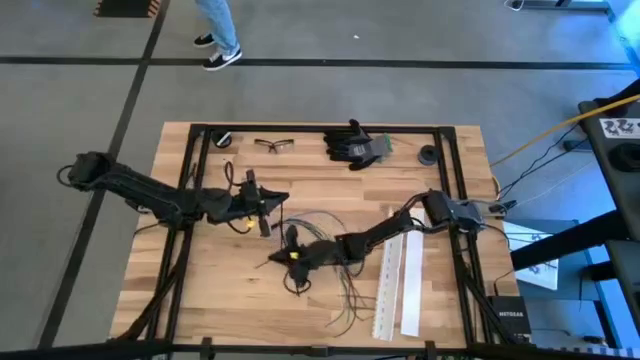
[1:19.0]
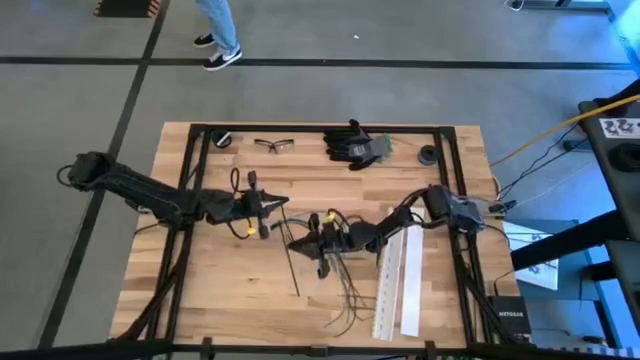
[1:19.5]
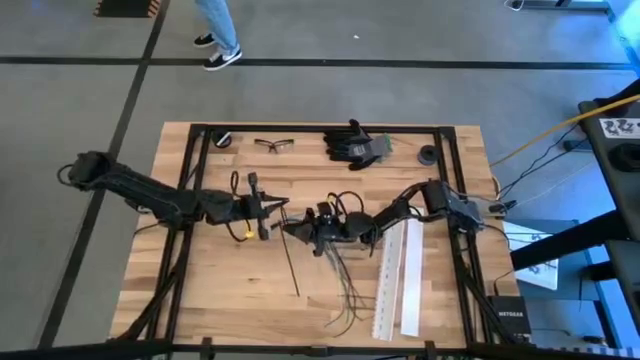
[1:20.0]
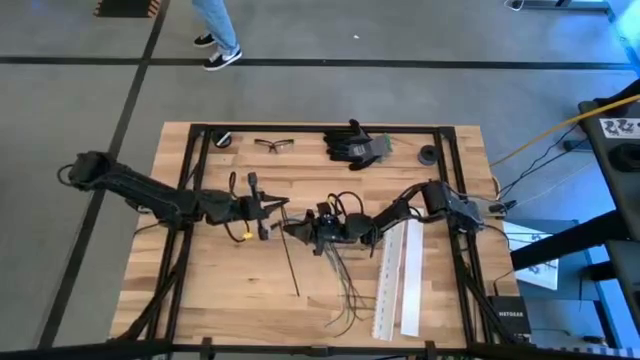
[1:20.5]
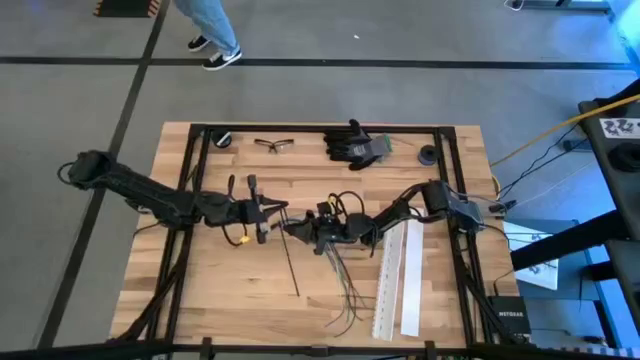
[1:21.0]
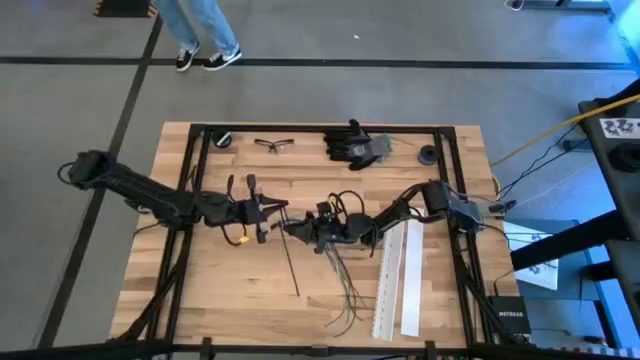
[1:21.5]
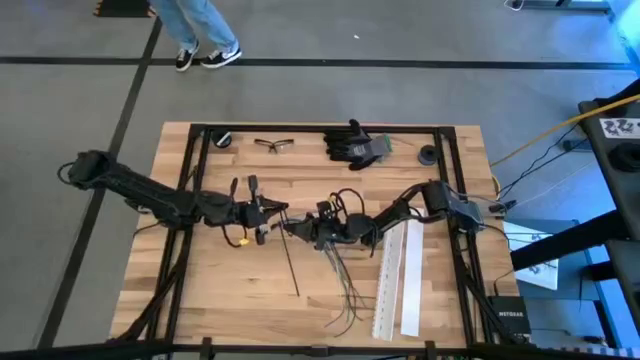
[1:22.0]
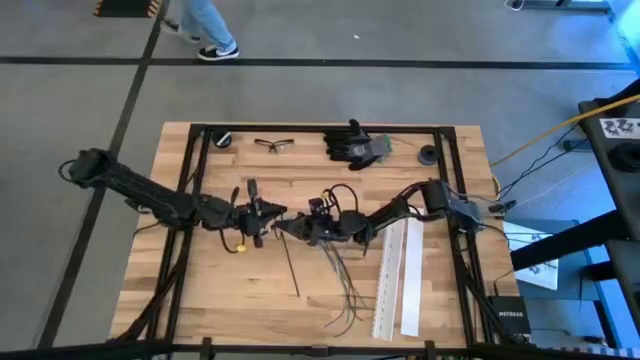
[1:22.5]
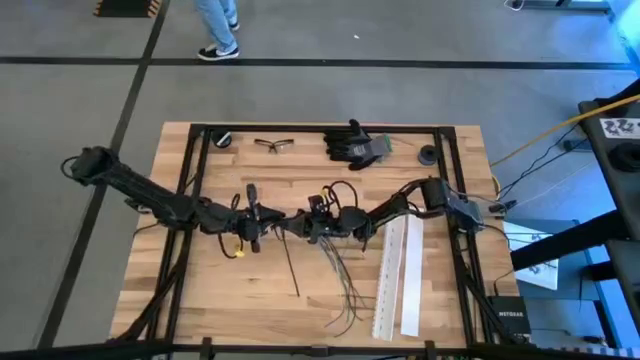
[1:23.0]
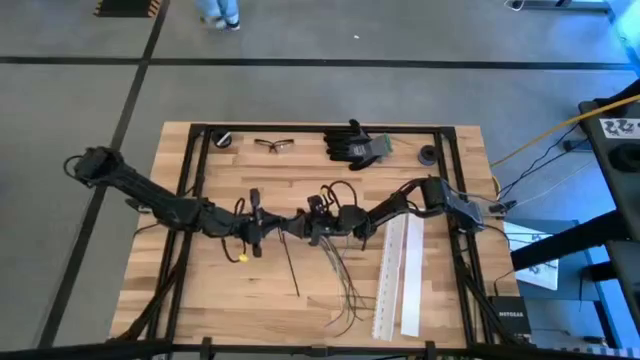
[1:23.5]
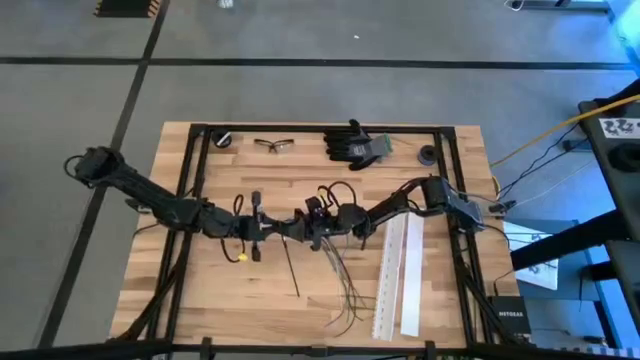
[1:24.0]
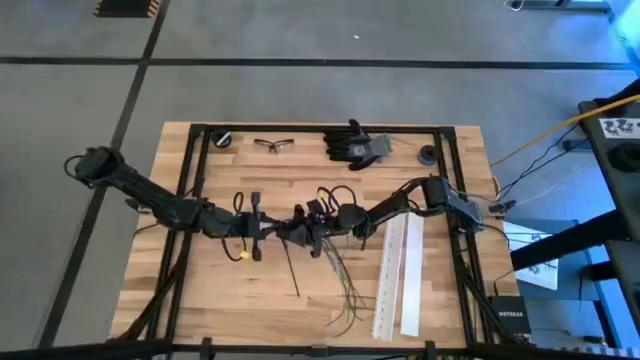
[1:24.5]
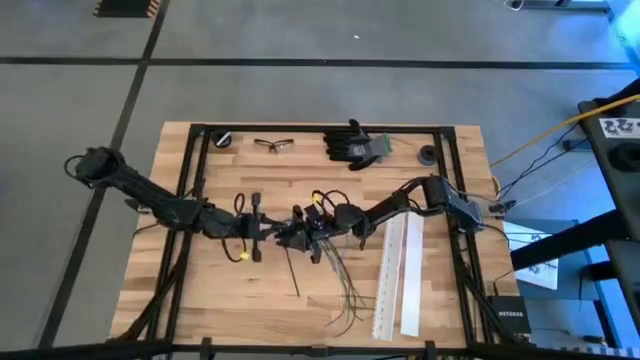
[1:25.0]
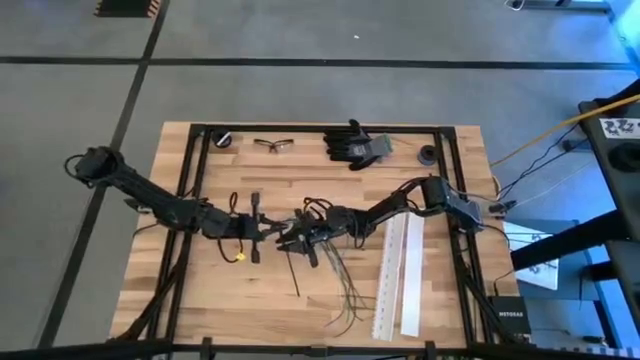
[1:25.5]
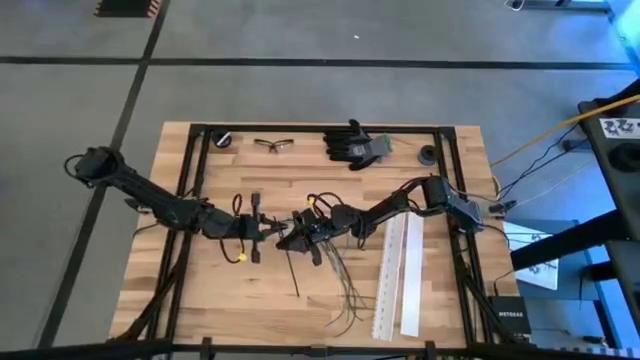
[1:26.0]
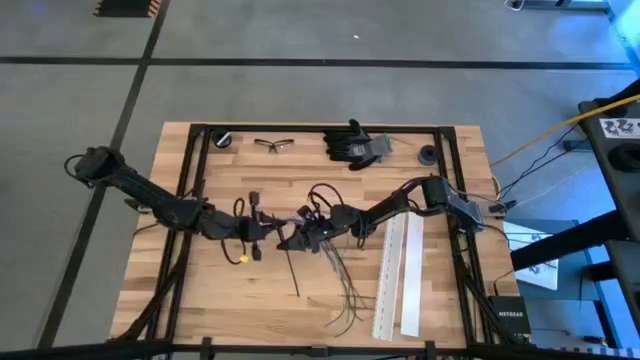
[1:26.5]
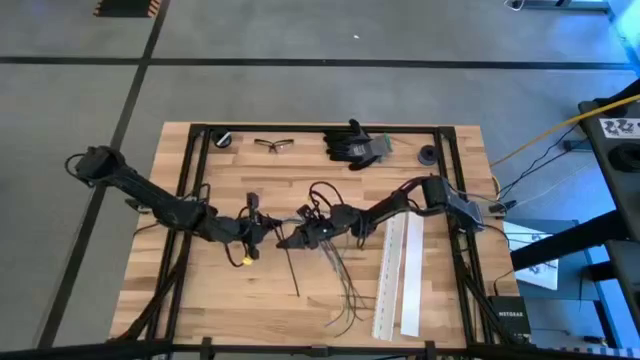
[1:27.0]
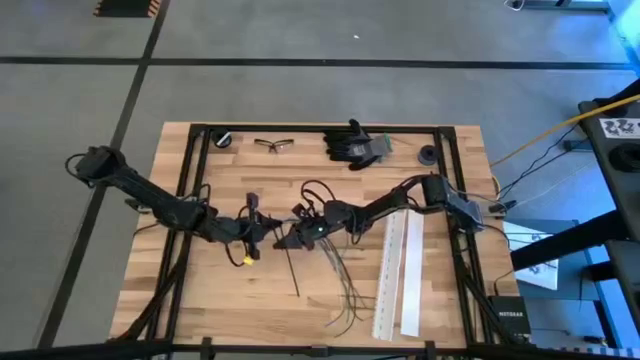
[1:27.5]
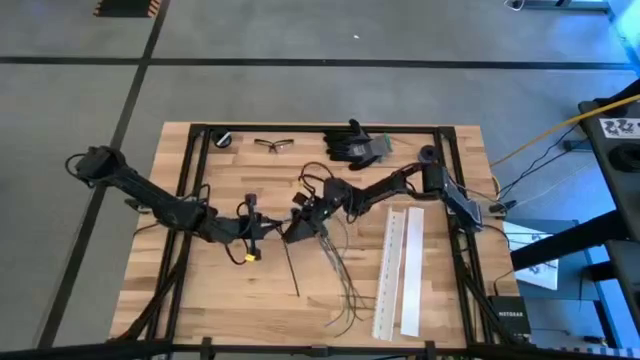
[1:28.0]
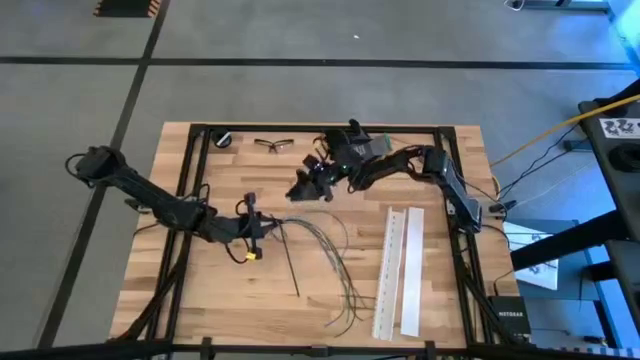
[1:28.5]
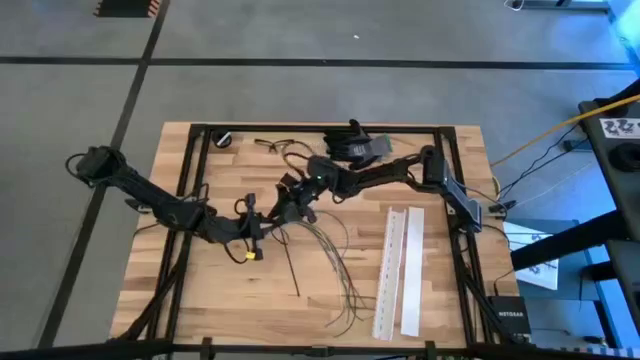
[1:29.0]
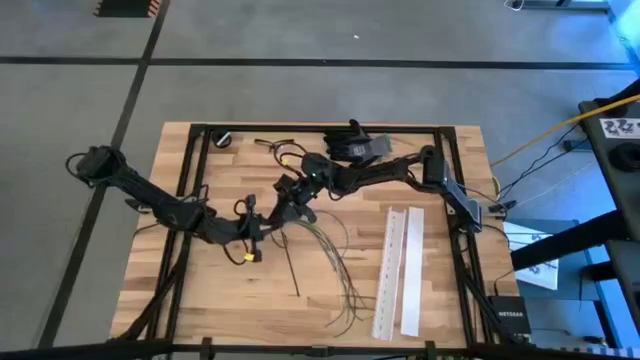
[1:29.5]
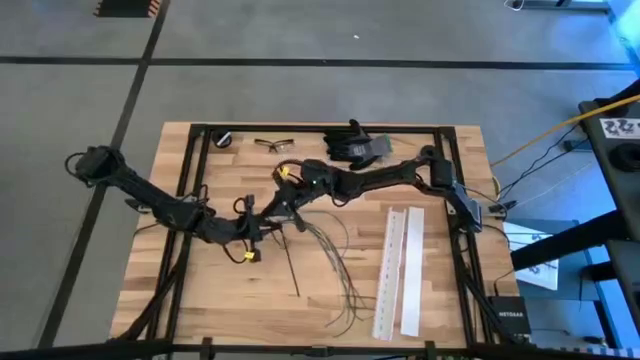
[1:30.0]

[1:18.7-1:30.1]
Task: Ziptie cables
Wrap the zip tie on the cables

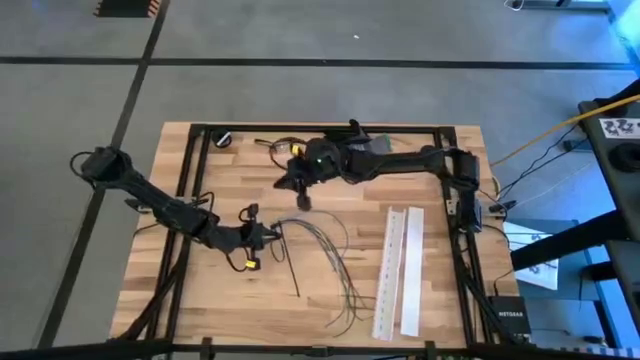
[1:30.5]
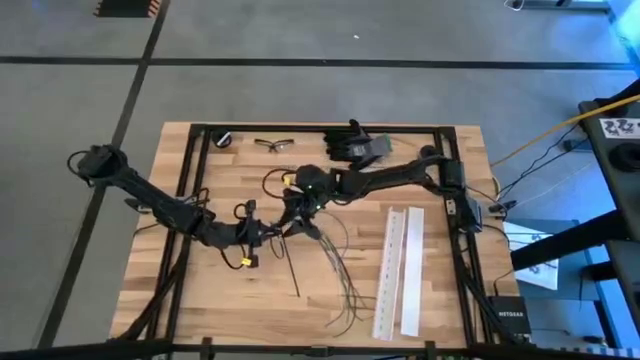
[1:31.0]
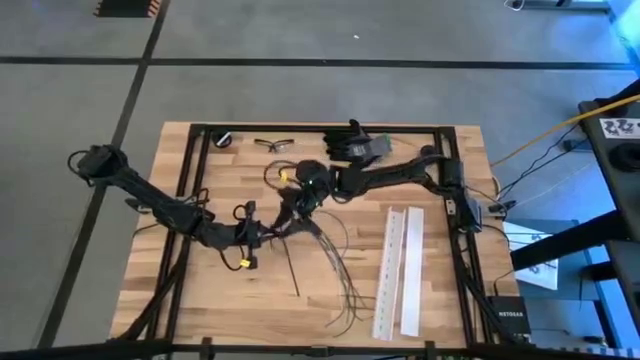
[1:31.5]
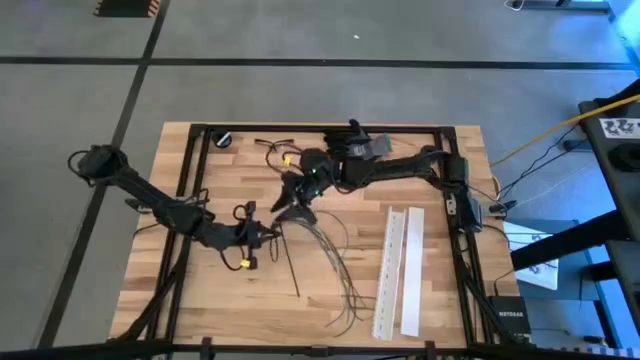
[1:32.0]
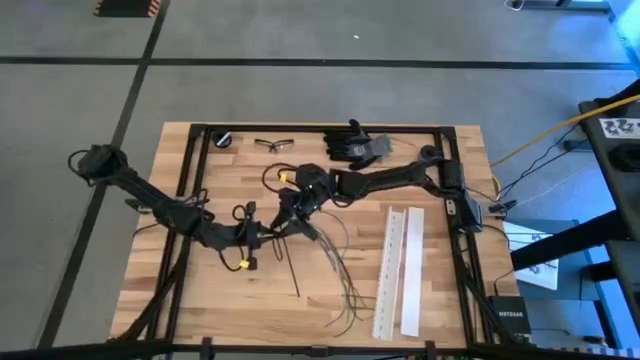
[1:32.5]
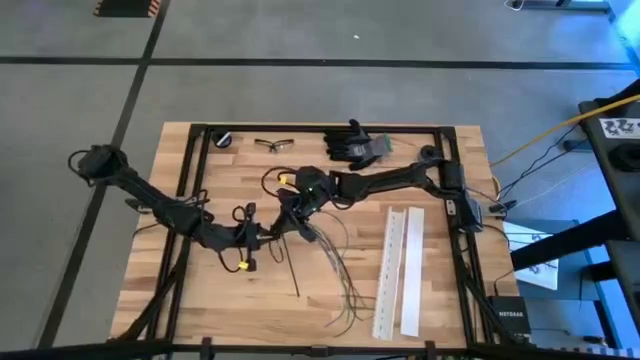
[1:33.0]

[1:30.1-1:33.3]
Wrap the zip tie on the cables

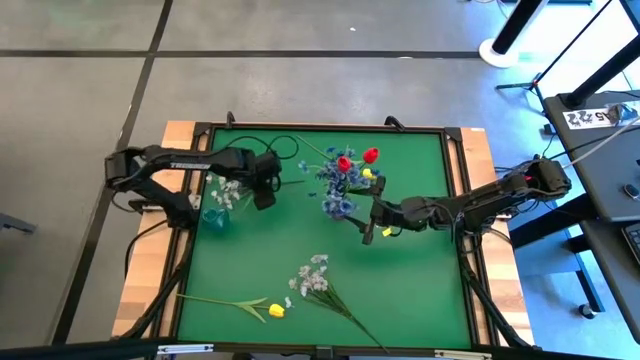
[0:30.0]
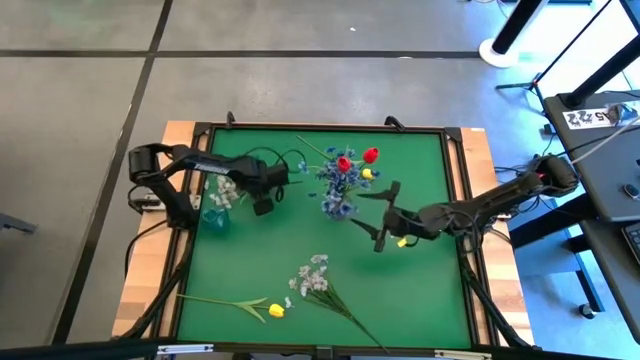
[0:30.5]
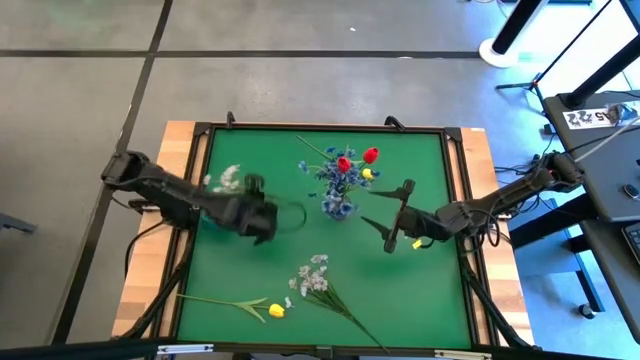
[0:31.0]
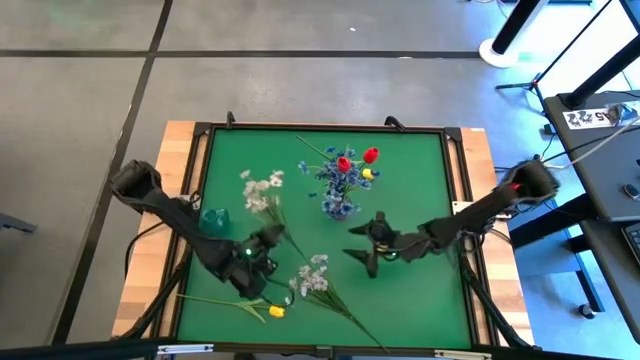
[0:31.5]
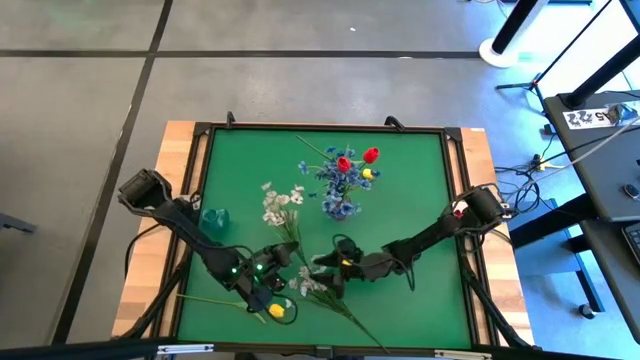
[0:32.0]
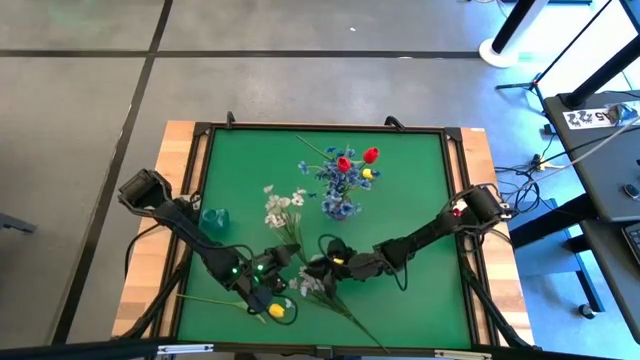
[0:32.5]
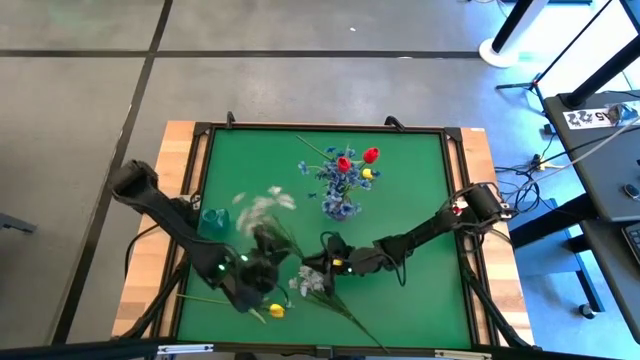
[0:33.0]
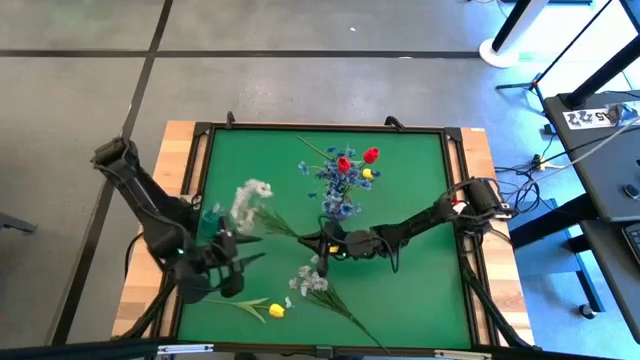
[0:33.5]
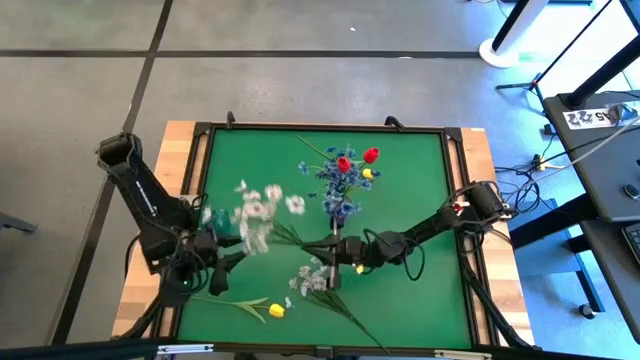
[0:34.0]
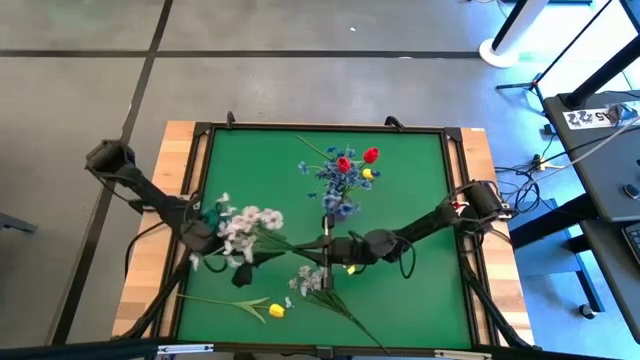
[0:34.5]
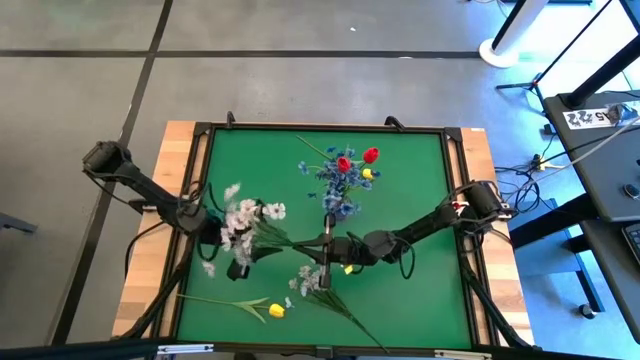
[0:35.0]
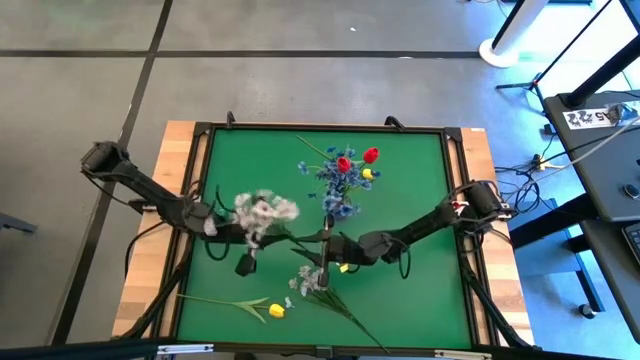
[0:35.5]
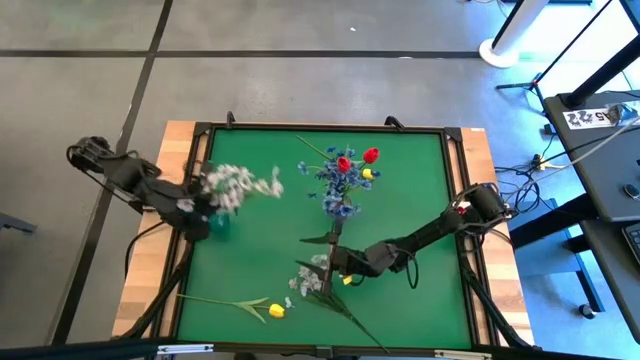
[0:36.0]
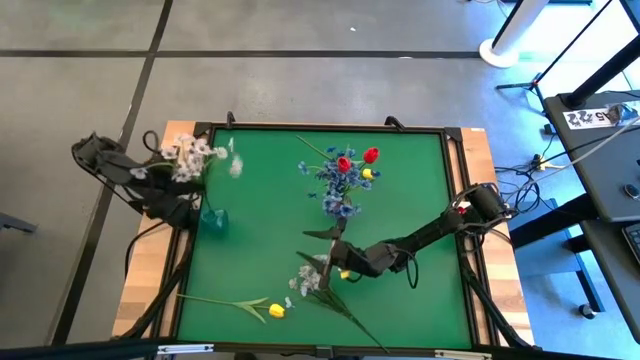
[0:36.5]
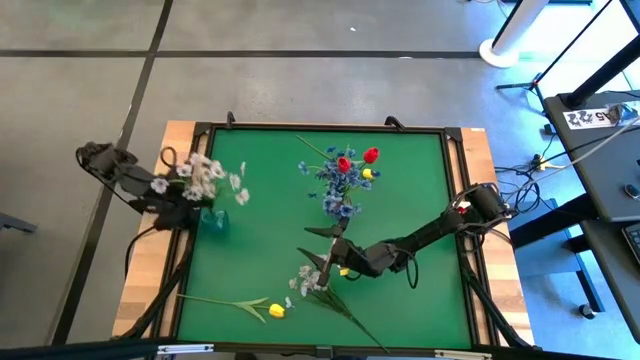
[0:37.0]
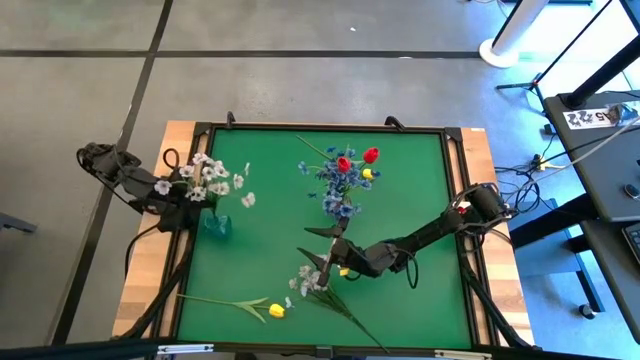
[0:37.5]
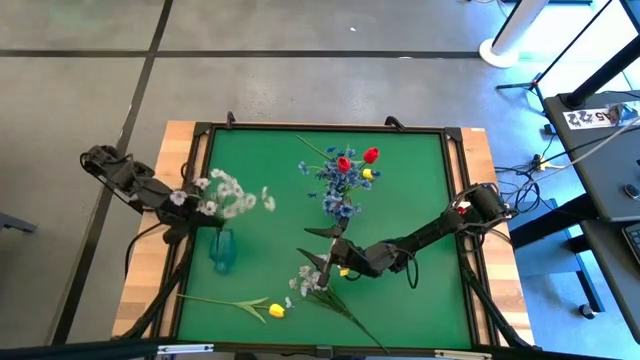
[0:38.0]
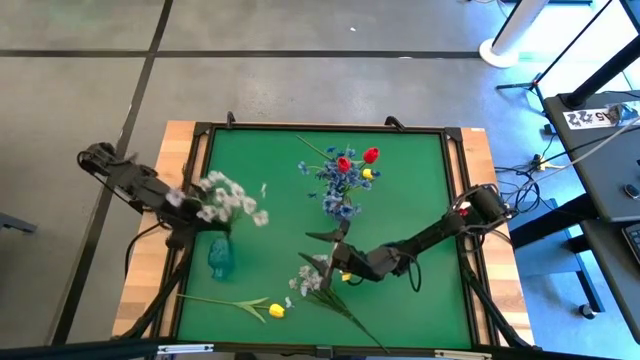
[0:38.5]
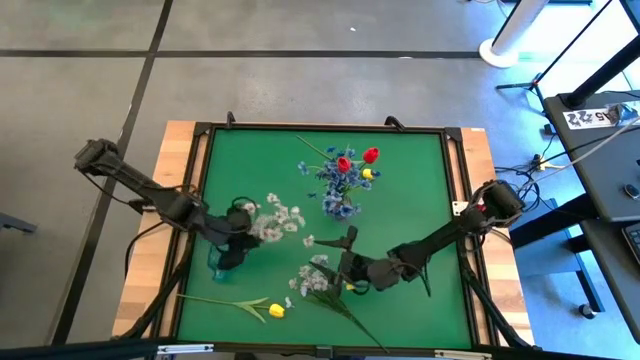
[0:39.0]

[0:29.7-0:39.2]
Task: Sort flowers into vase by color
Put the top white flowers into the blue vase
